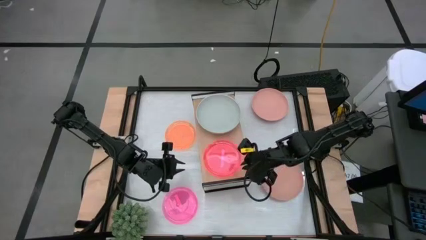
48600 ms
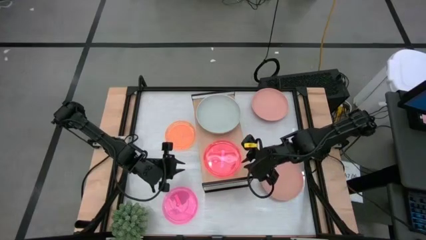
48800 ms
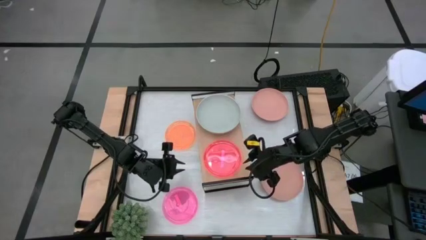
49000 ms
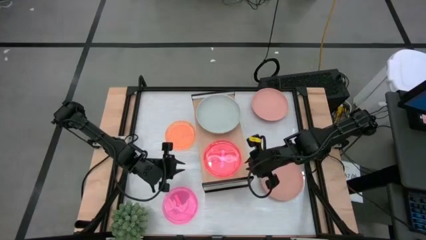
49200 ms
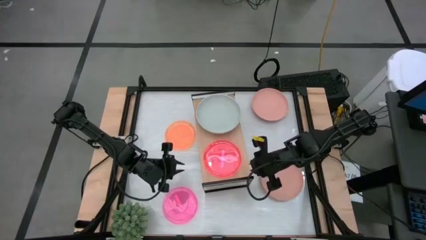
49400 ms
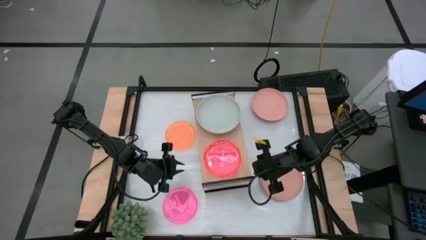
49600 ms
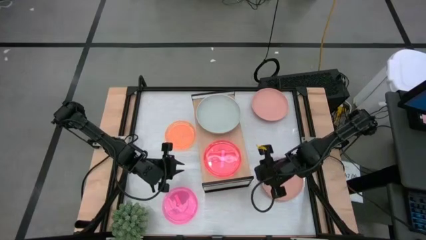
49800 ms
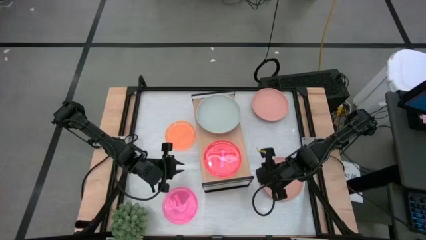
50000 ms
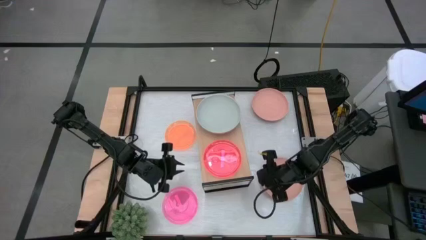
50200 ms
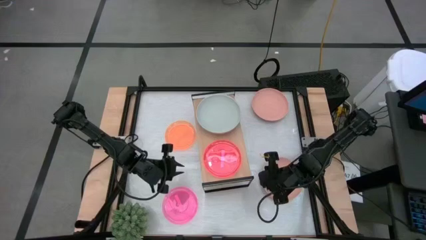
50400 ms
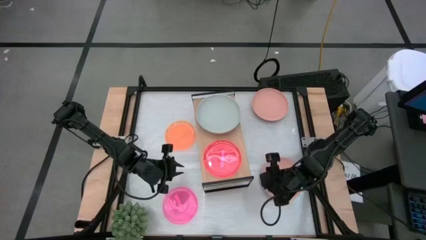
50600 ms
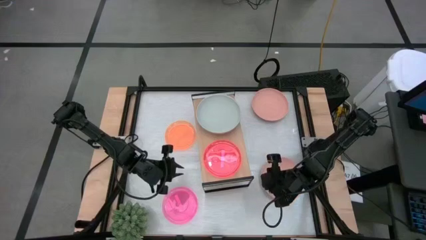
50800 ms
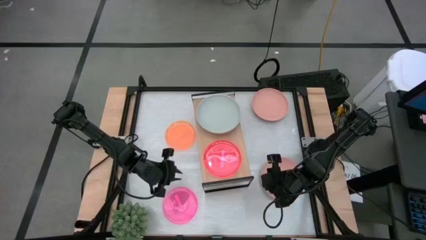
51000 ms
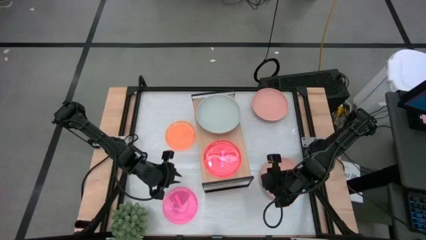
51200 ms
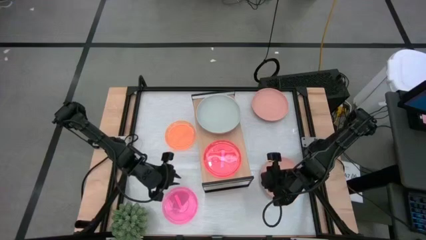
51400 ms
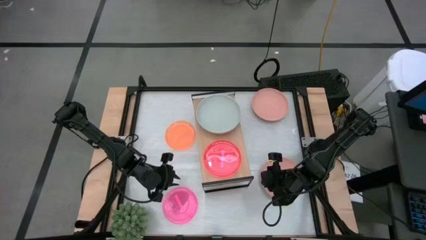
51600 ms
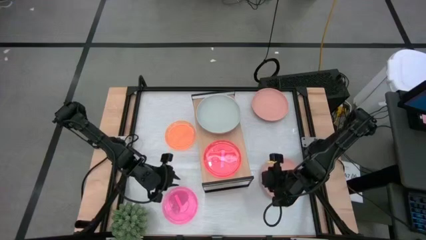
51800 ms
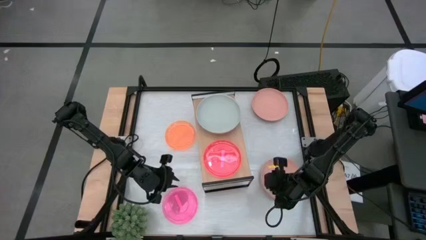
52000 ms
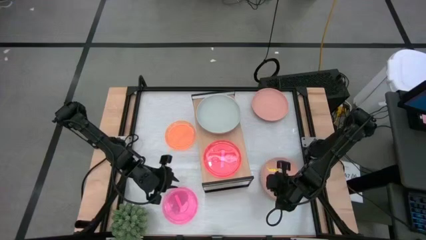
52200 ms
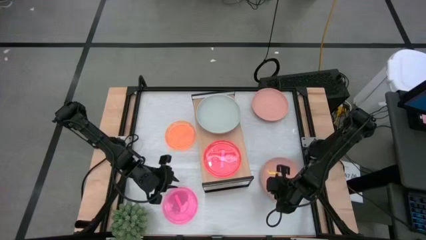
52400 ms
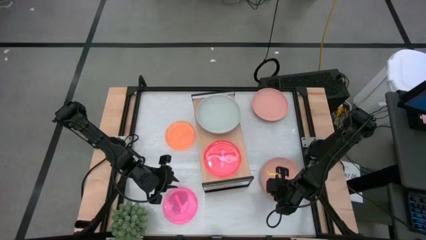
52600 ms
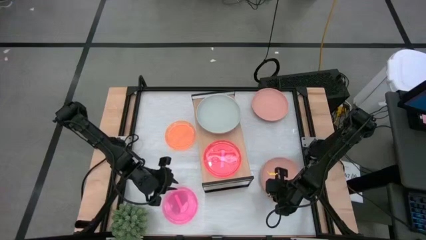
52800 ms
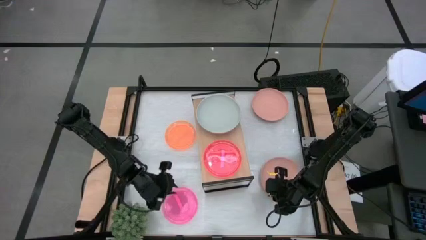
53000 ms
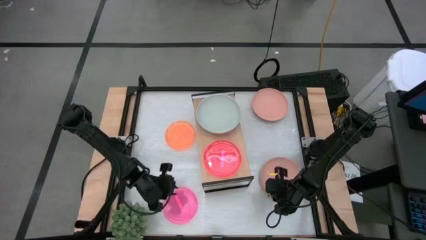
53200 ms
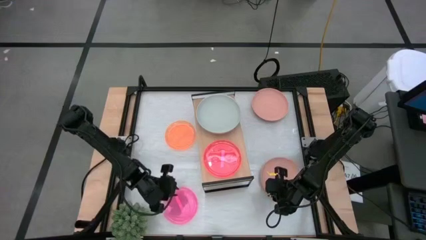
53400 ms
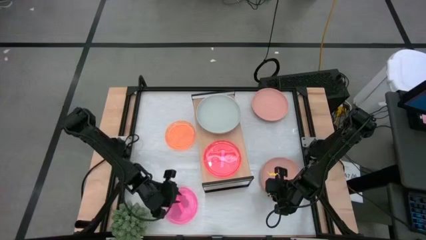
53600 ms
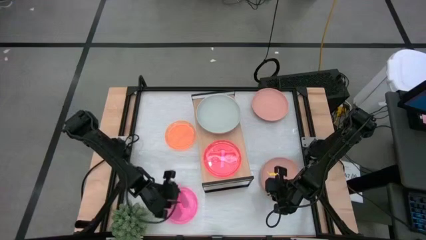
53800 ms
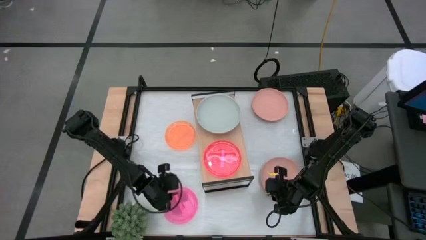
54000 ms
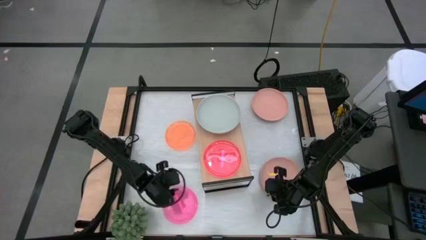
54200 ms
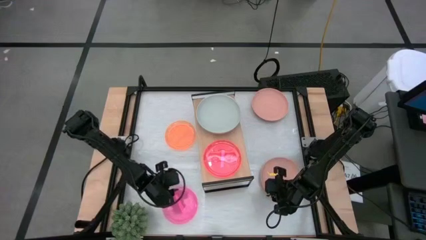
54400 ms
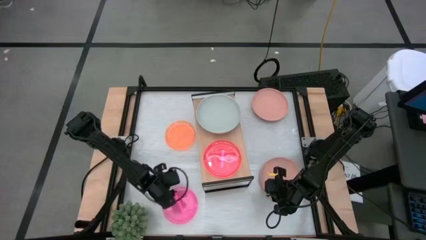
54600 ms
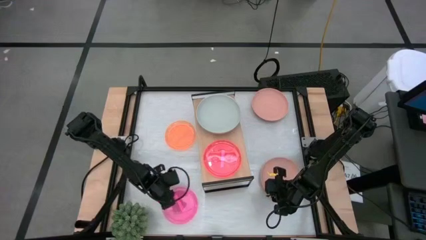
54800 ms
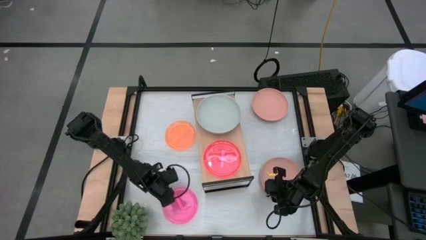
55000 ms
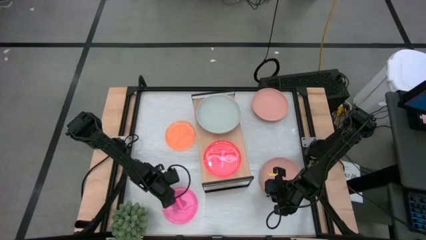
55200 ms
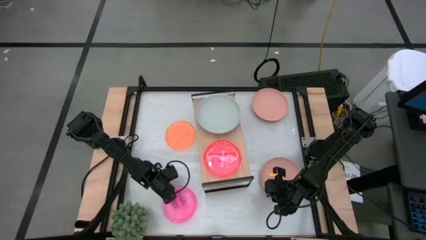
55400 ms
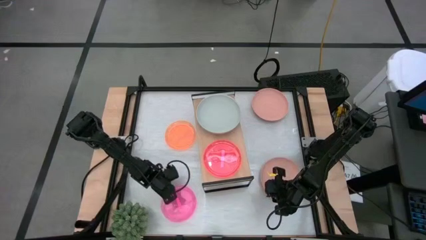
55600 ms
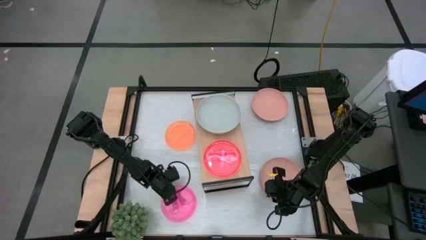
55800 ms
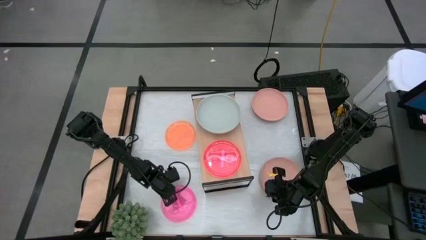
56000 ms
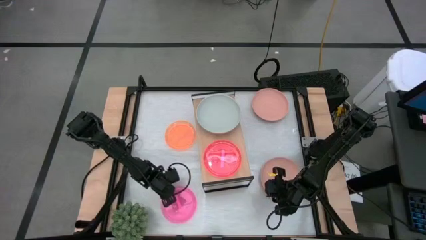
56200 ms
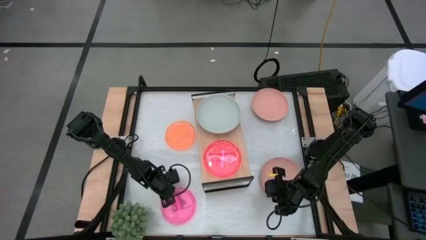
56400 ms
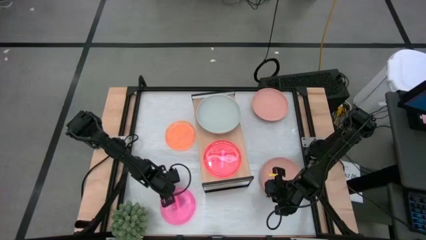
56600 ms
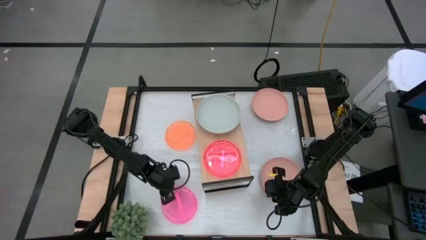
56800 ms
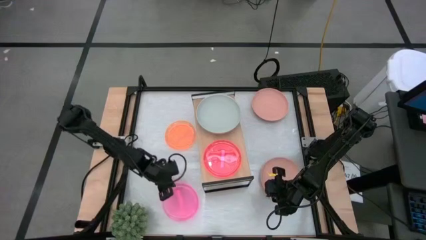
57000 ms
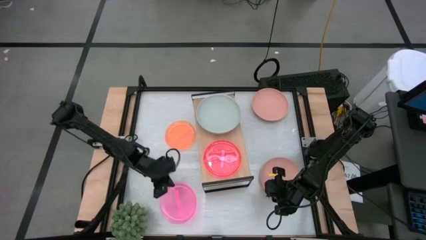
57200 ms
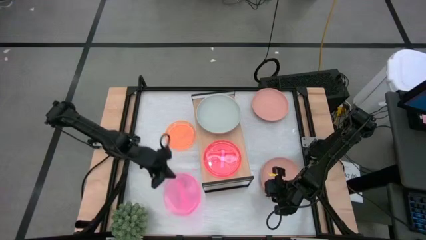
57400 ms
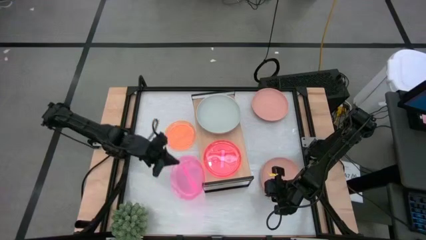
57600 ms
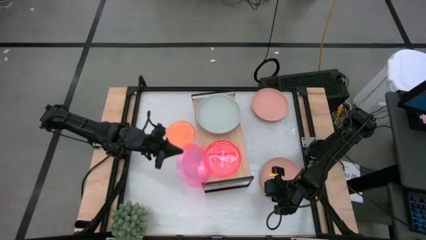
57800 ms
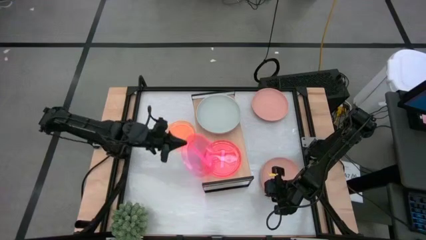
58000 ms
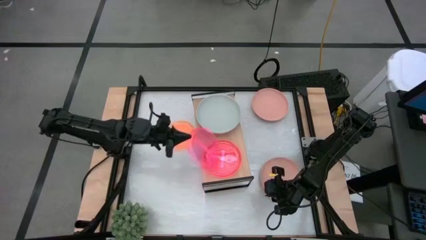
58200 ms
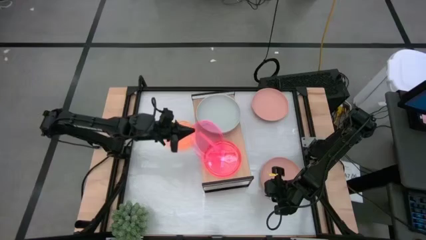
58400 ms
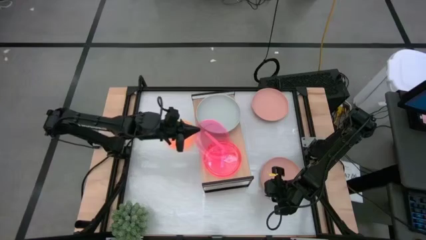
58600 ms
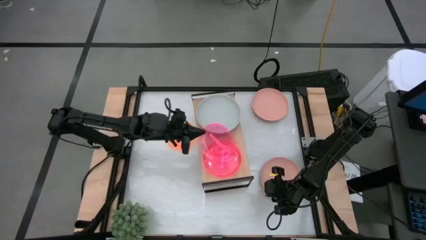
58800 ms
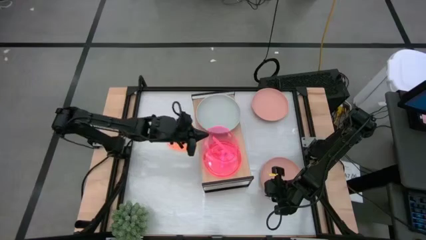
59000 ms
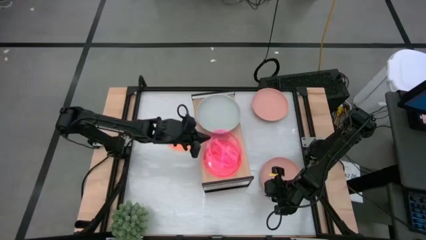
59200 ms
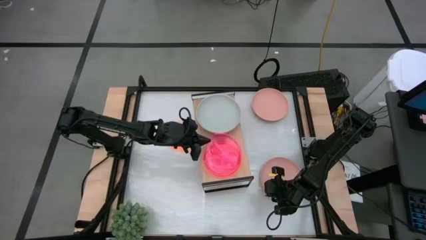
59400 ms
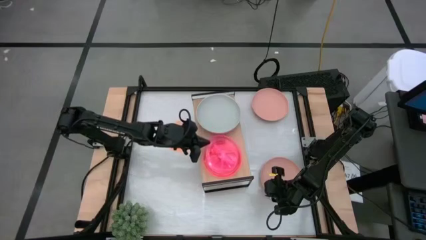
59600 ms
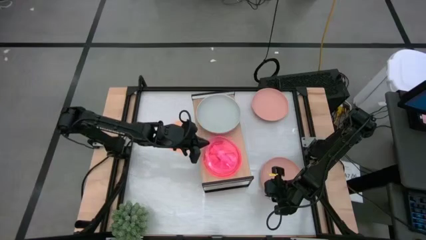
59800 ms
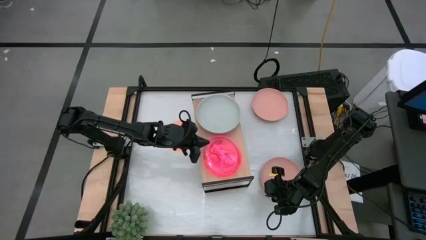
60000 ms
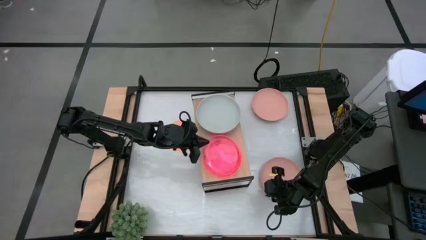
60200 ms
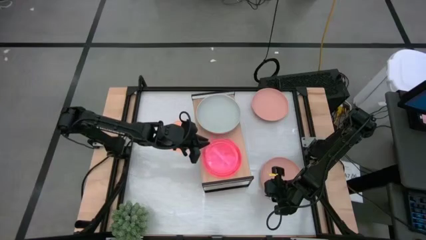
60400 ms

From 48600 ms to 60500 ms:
Task: Place and stack plates onto a shelf
Stack the pink plate on the pink plate on the shelf
